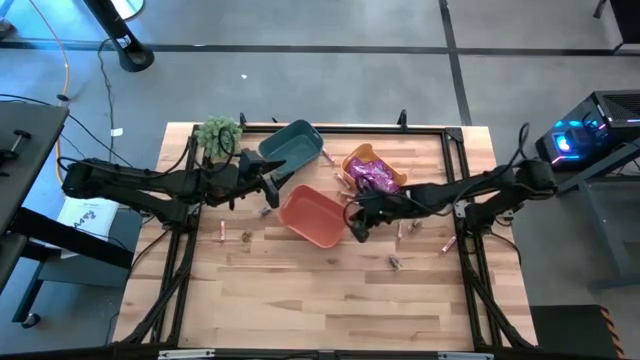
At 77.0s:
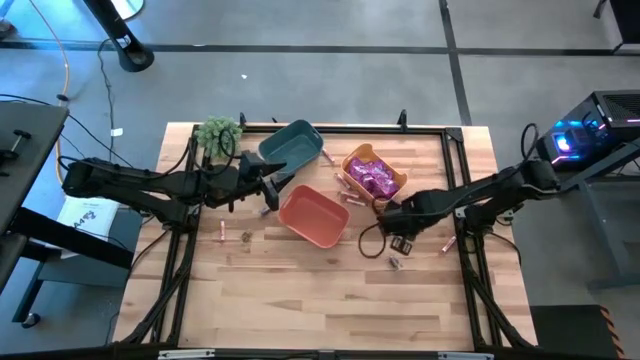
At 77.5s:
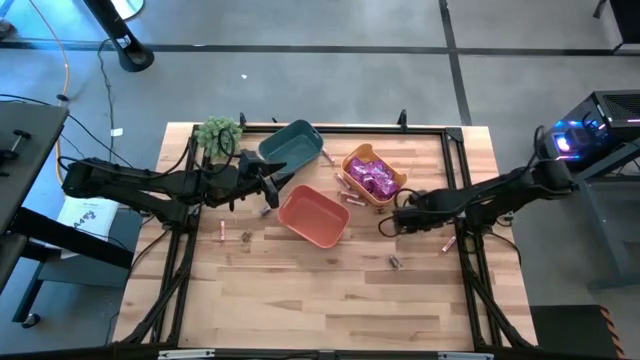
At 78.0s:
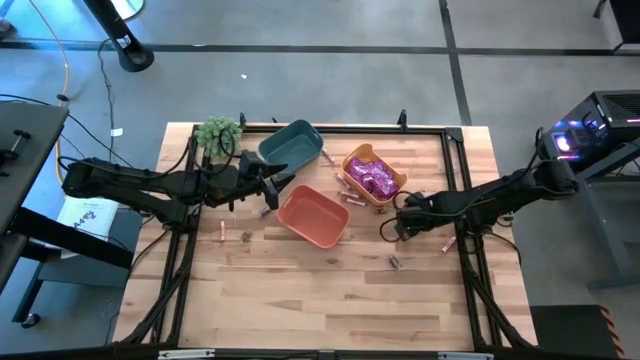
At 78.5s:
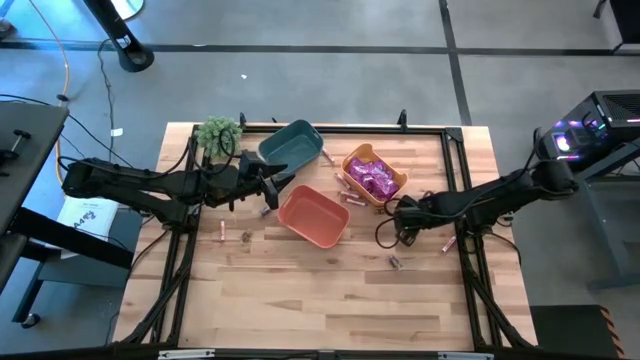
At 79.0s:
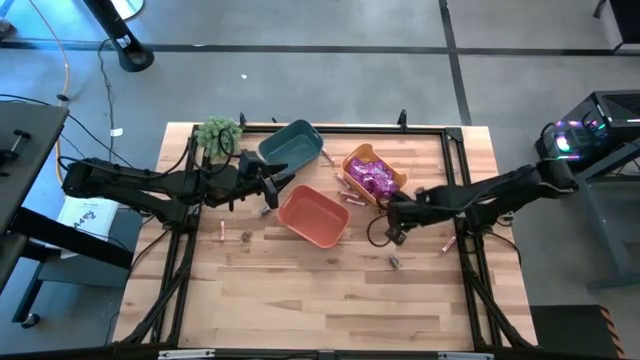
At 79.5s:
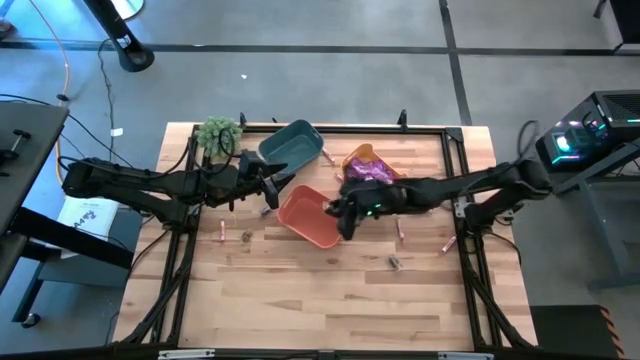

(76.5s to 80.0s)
Task: Sort candy
Put the brown candy into the orange bin

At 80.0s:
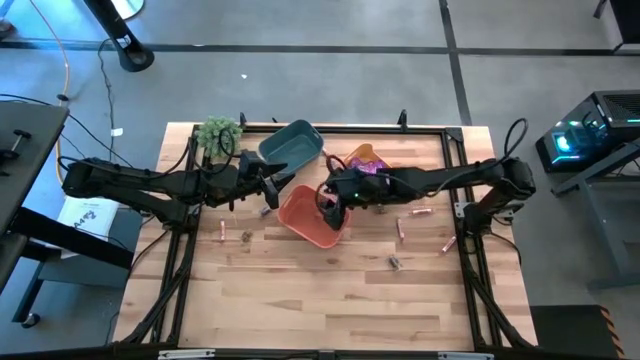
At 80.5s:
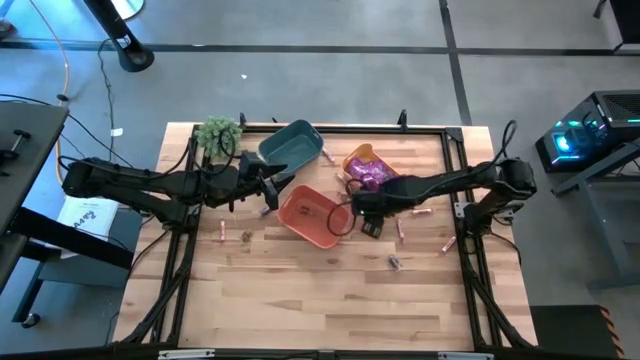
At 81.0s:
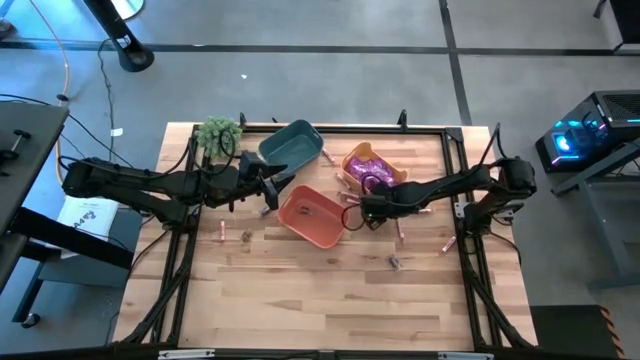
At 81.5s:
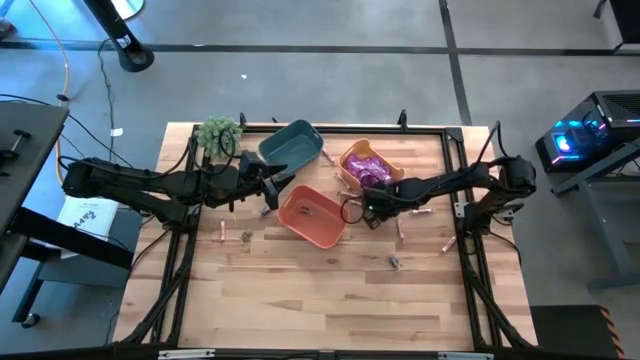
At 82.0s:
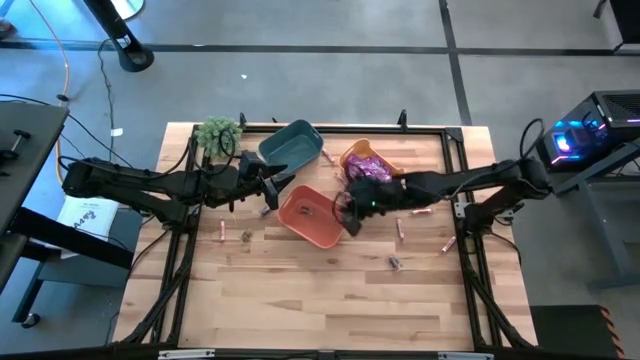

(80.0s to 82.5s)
Put the brown candy into the orange bin

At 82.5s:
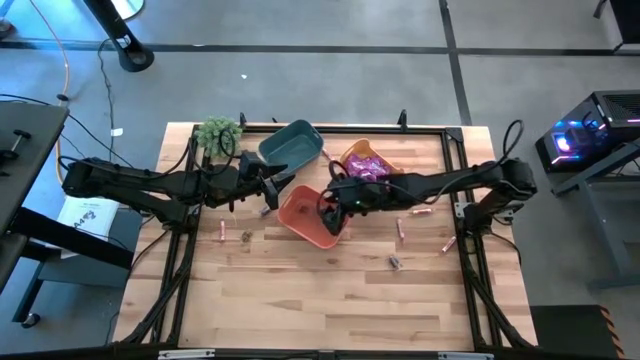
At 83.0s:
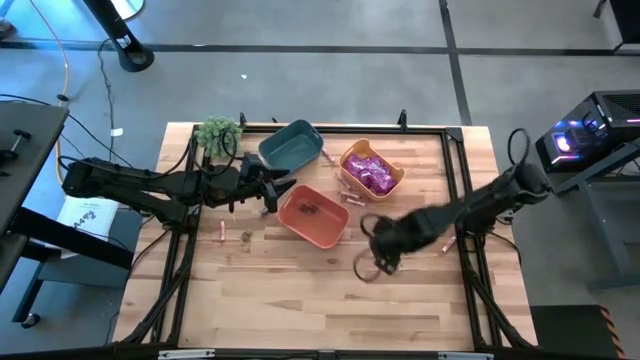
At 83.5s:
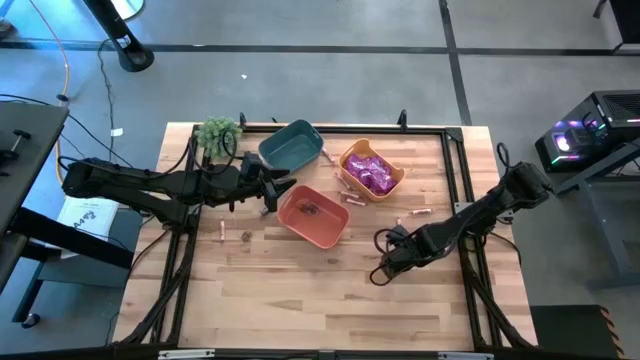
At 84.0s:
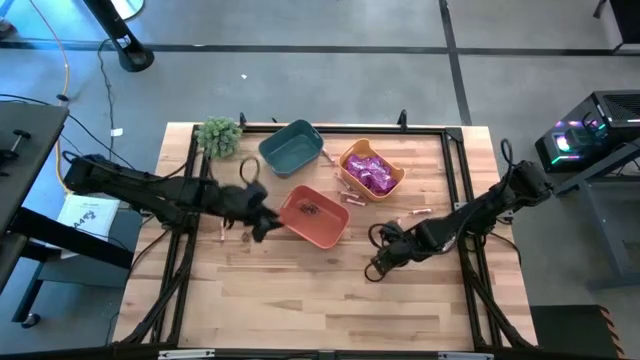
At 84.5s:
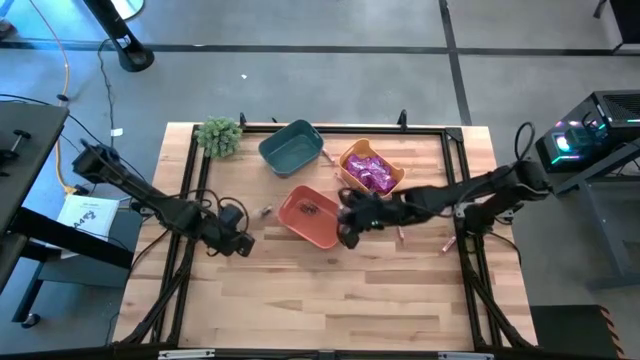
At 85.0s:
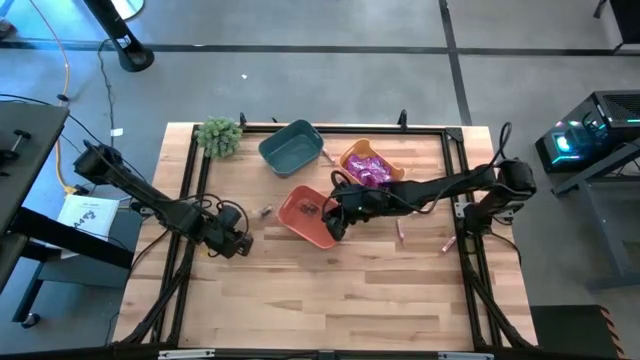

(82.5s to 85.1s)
Put the brown candy into the orange bin

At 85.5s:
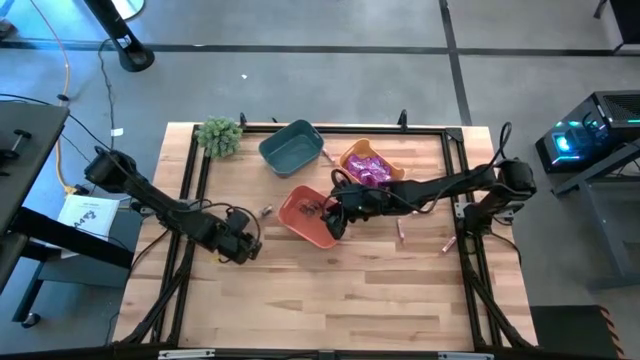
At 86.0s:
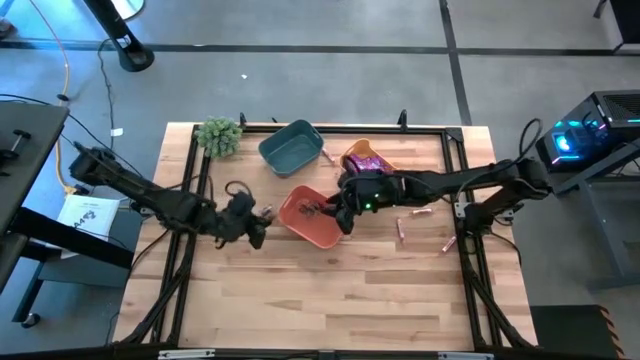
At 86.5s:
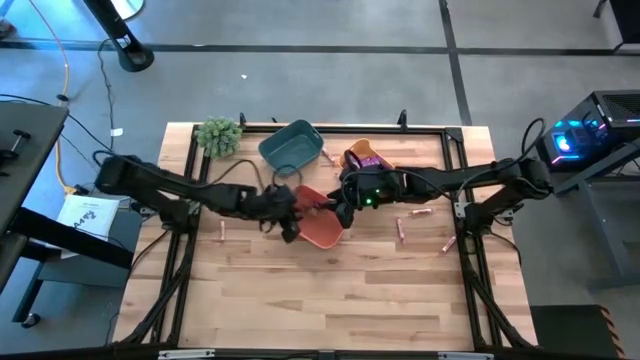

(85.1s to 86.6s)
Put the bottom brown candy into the orange bin

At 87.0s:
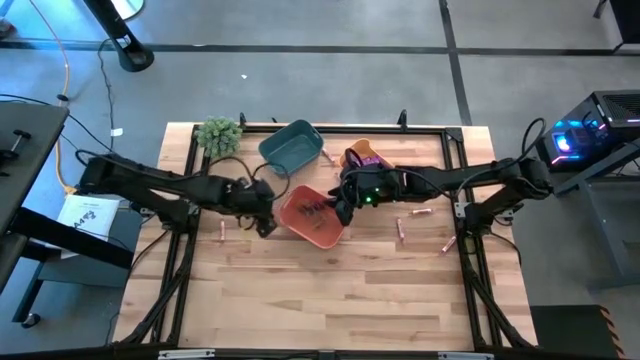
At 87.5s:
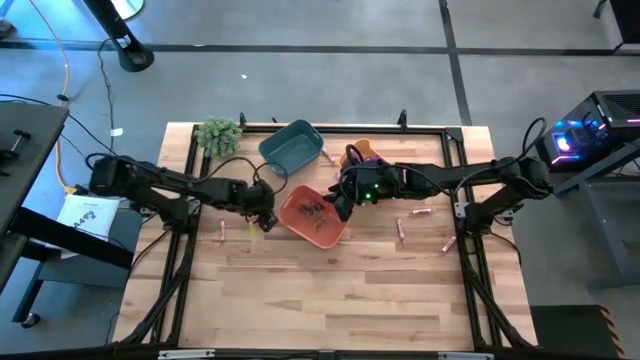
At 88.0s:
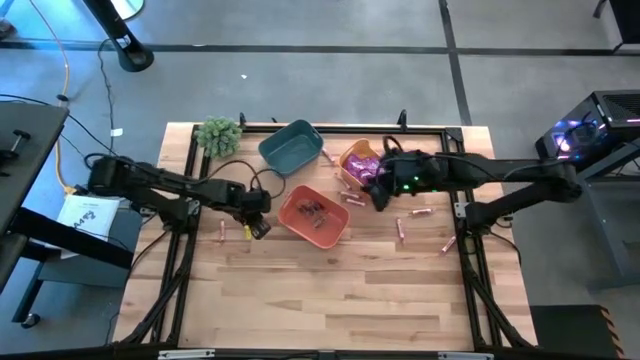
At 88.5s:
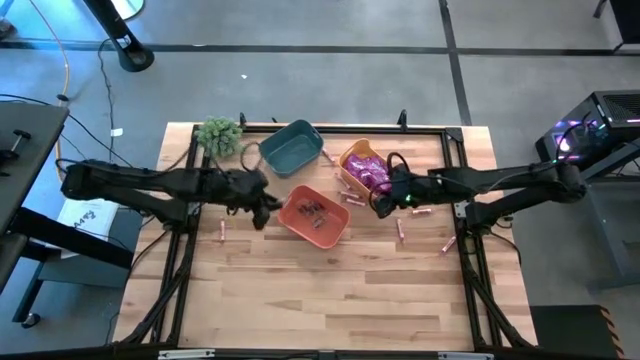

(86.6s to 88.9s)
Put the bottom brown candy into the orange bin

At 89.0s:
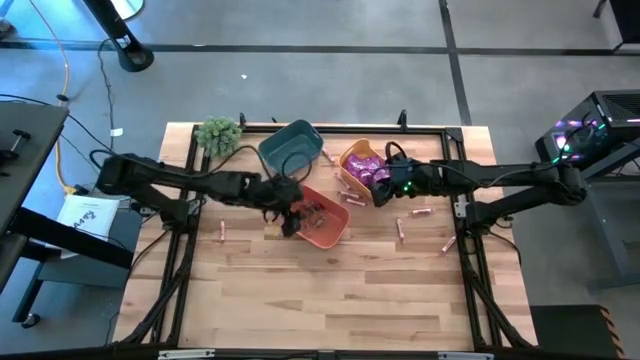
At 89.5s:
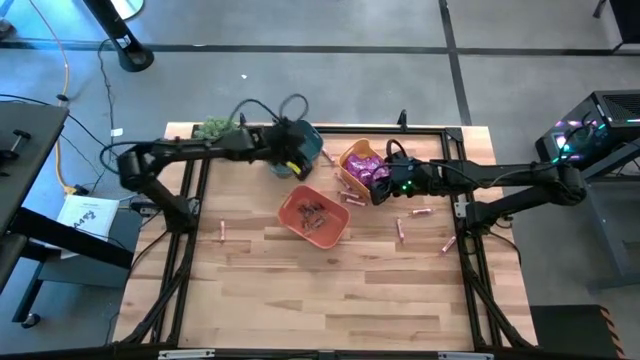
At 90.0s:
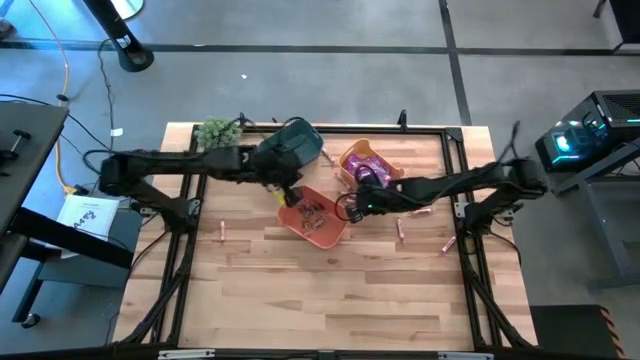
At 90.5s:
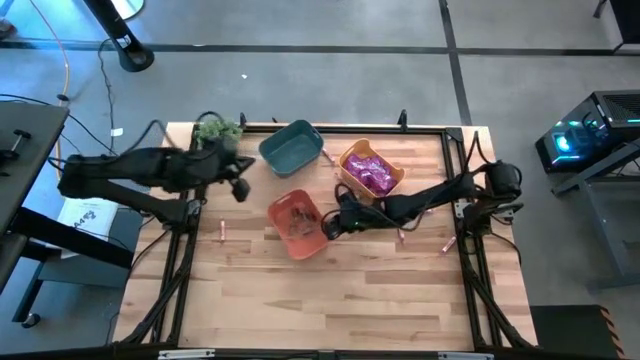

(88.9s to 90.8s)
Adjust the orange bin

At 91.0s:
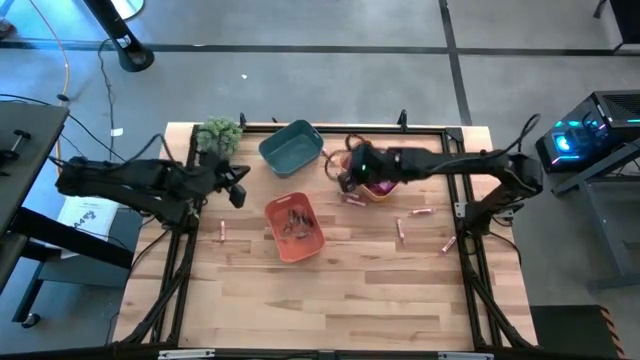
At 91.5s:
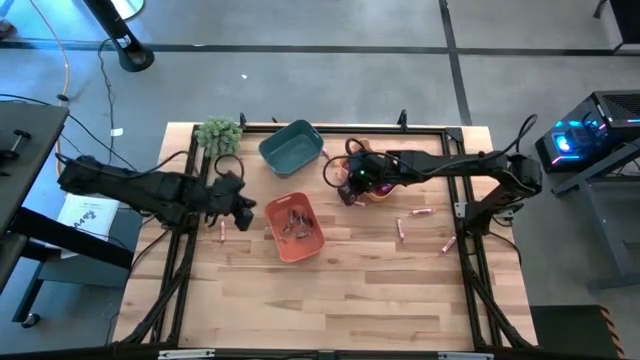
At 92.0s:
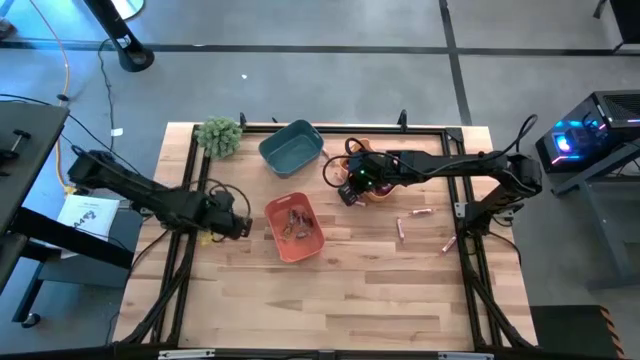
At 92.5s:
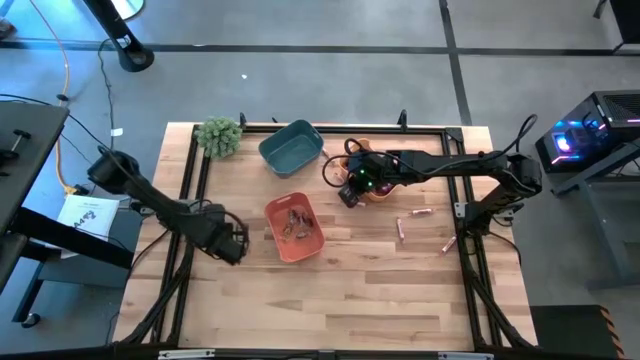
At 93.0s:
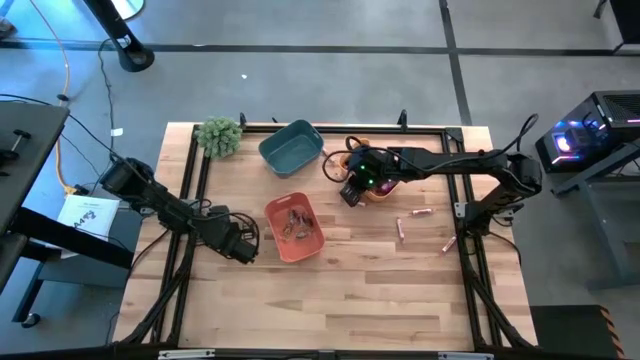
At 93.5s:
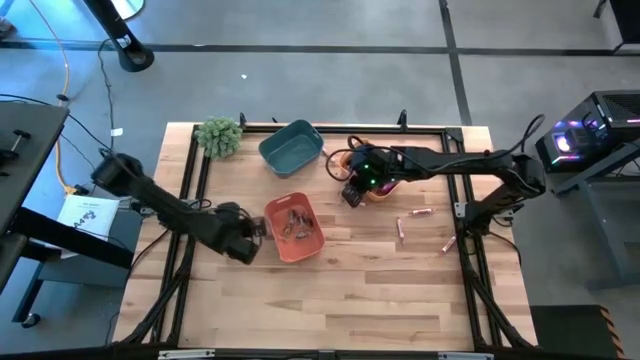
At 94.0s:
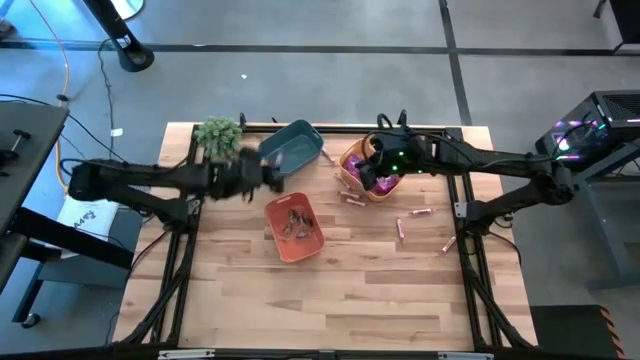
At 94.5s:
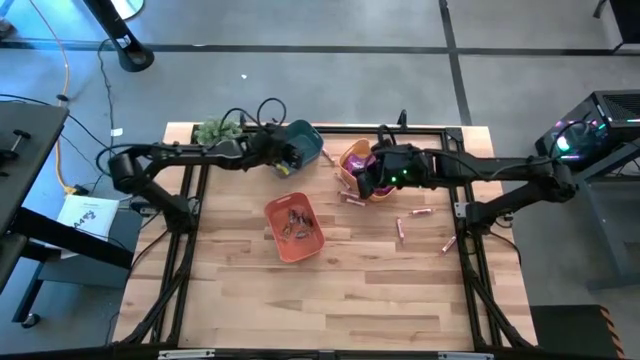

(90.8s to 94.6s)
Put the red candy into the blue bin

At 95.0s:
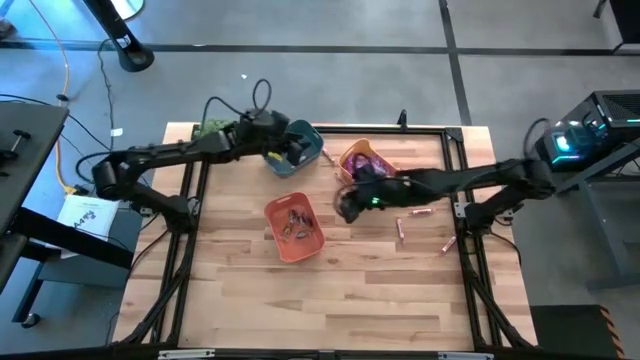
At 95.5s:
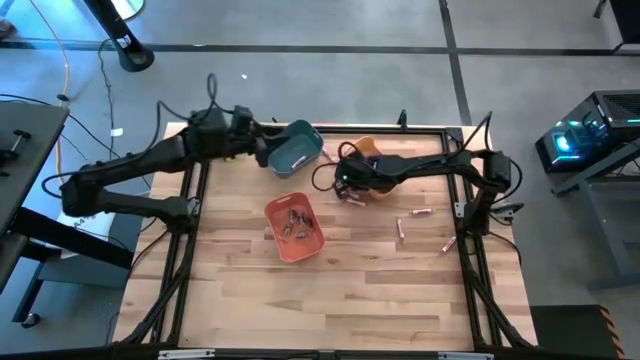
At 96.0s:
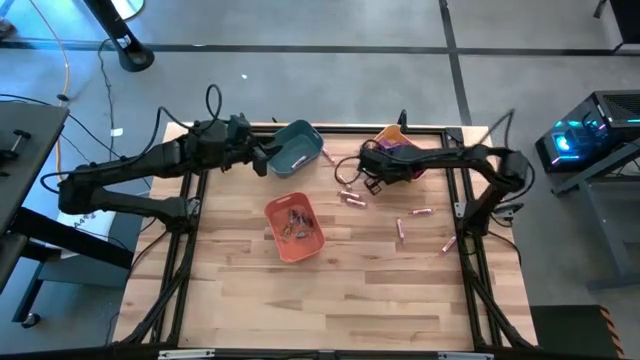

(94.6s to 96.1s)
Adjust the yellow bin on the table

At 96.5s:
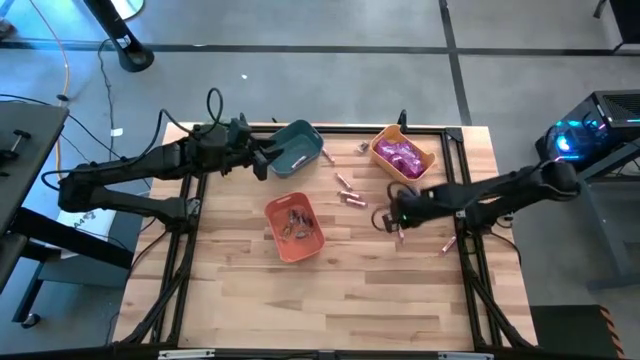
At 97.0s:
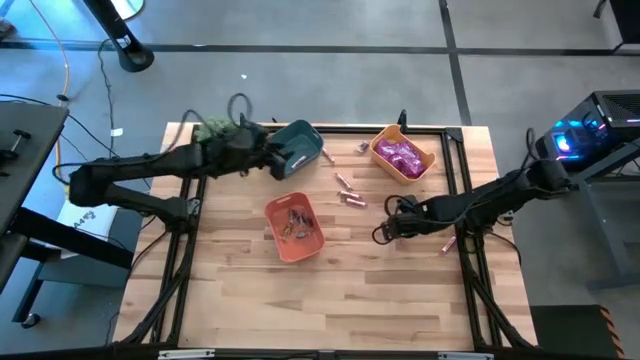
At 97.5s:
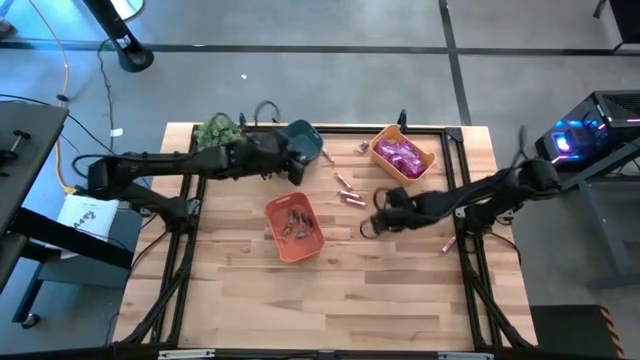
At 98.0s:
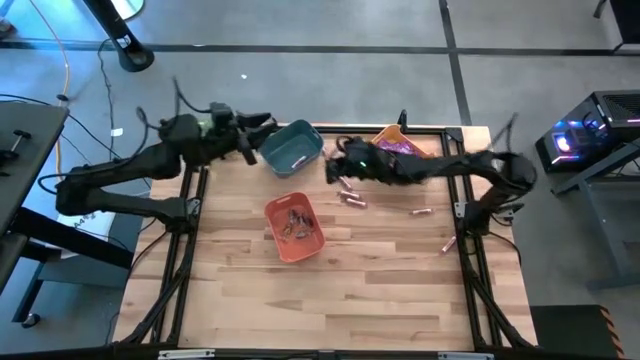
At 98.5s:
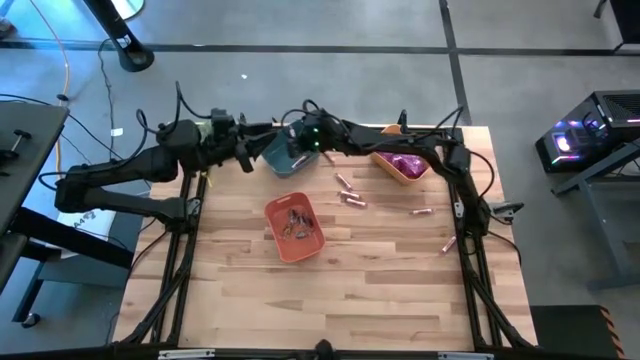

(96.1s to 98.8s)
Put the red candy into the blue bin
